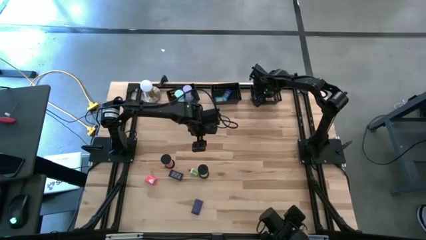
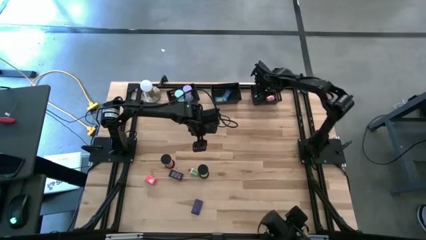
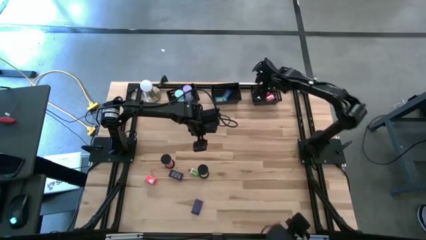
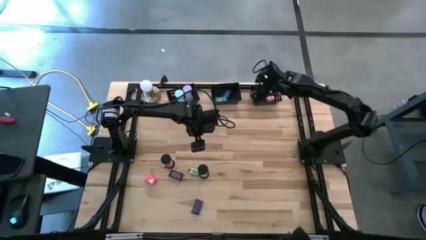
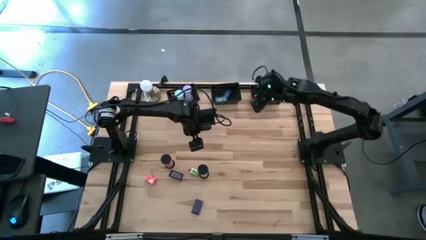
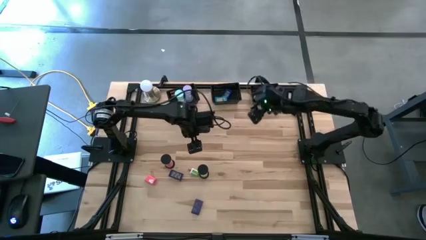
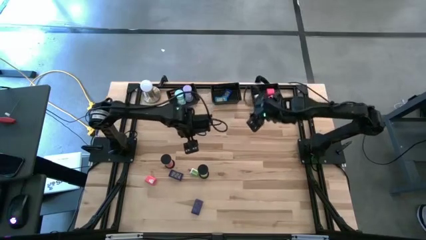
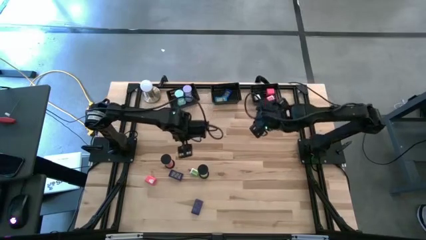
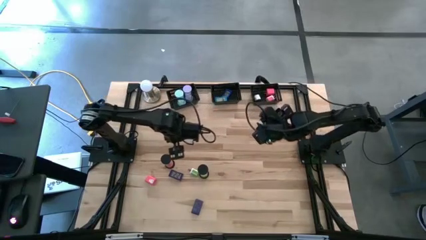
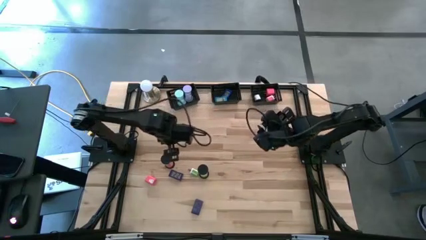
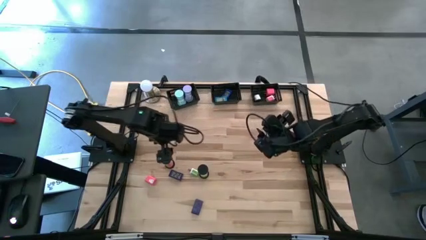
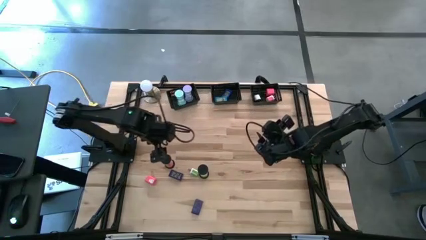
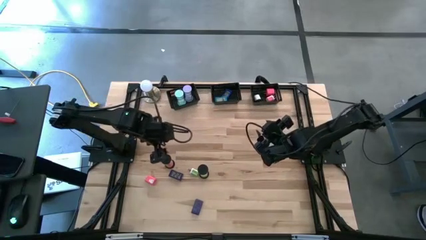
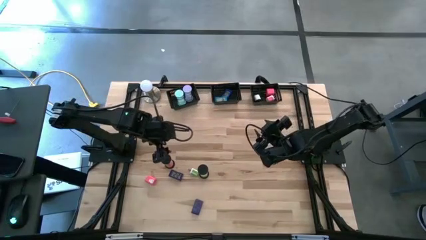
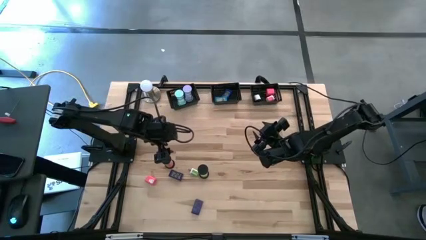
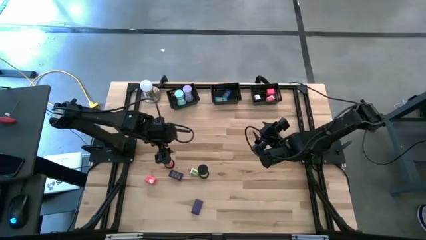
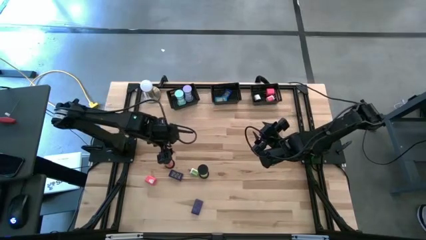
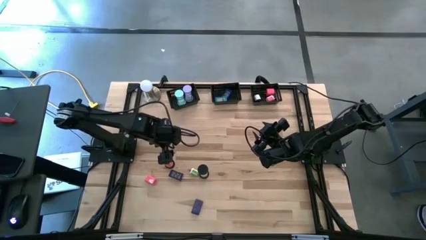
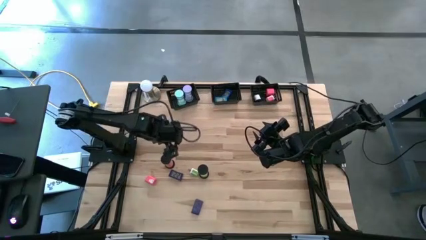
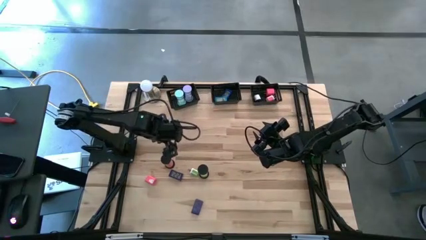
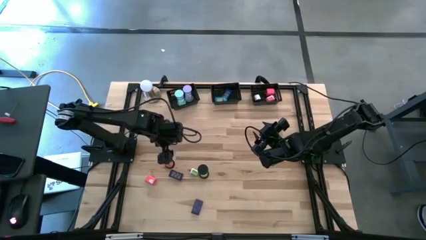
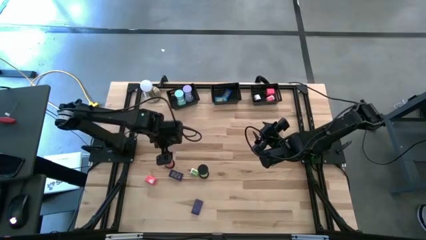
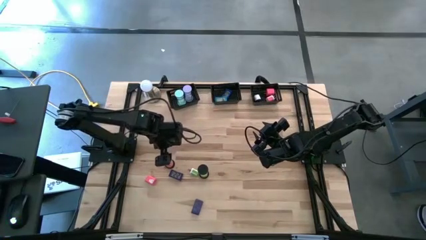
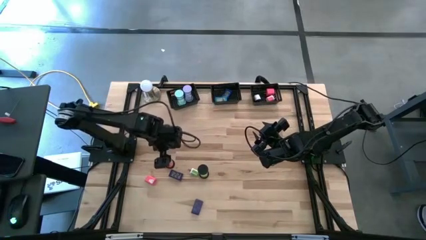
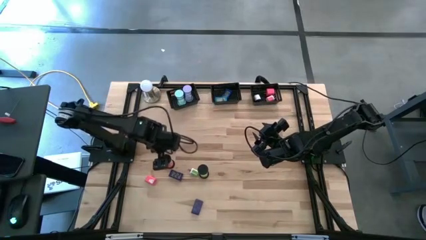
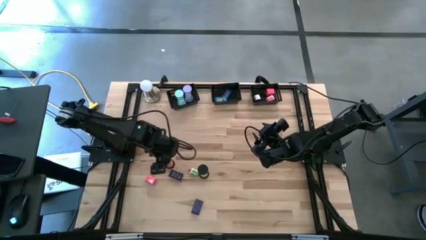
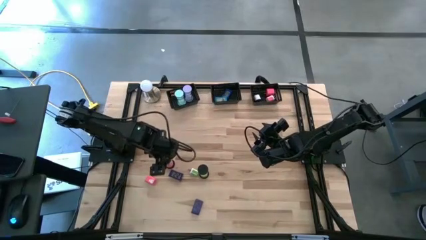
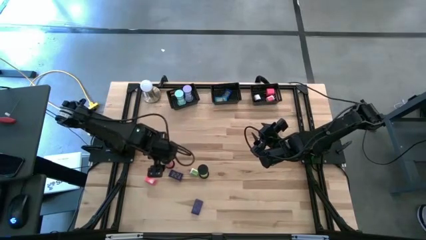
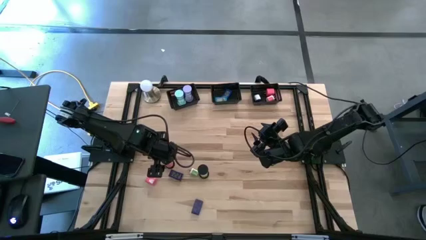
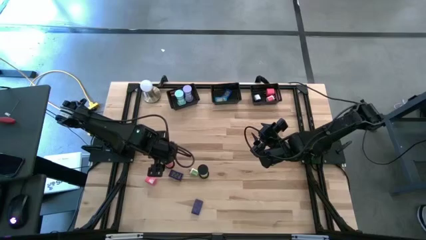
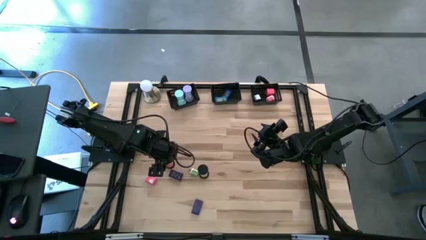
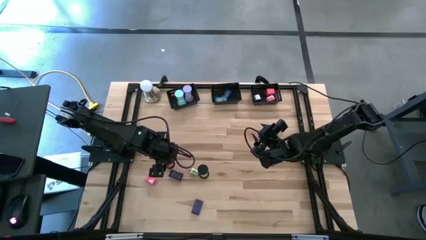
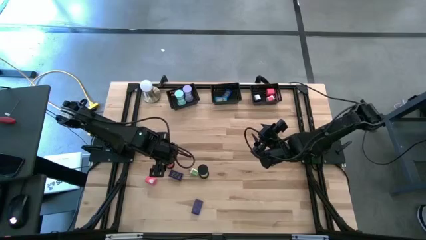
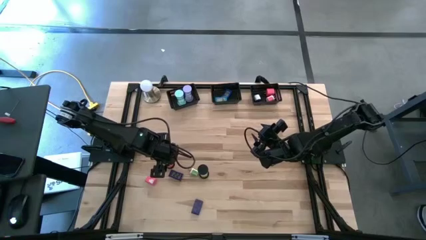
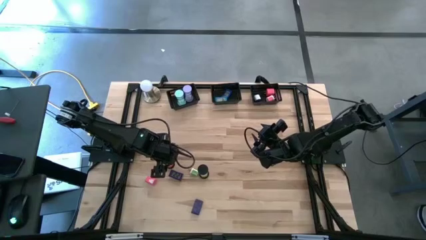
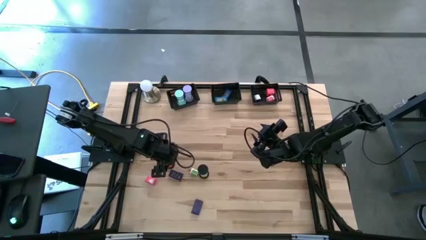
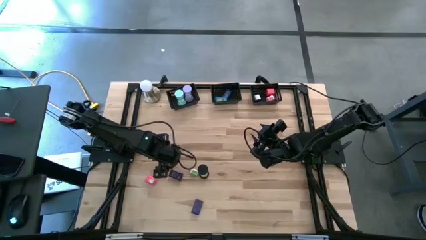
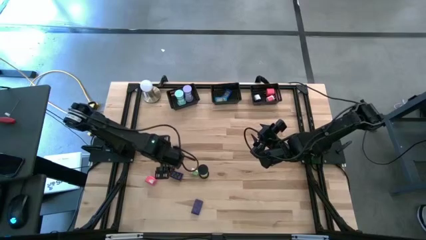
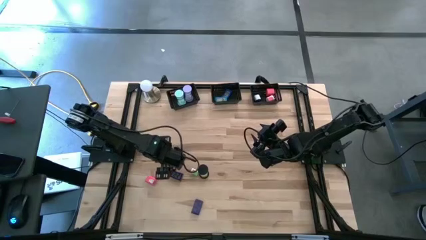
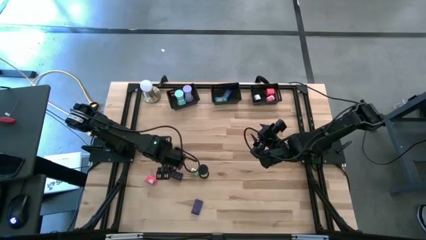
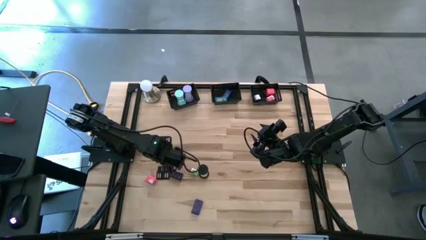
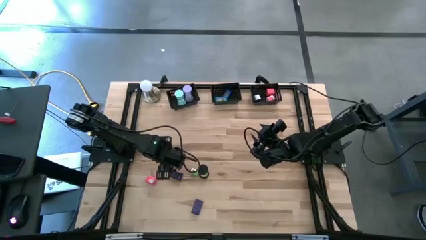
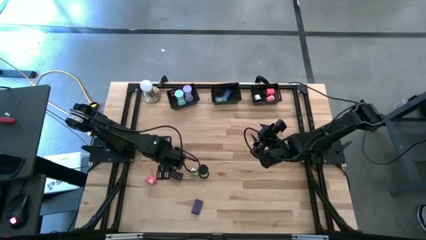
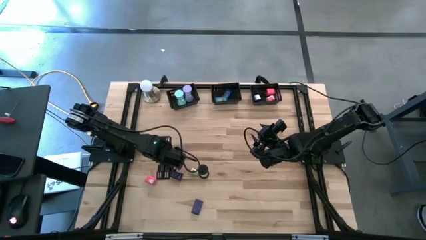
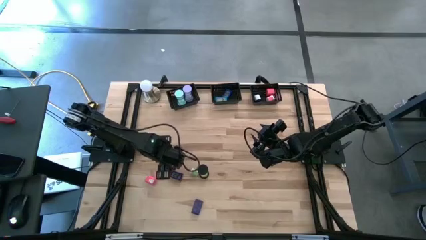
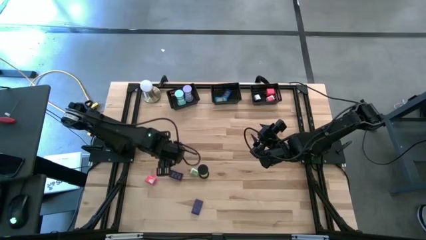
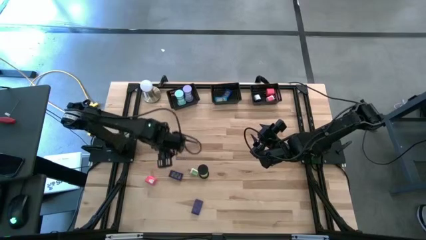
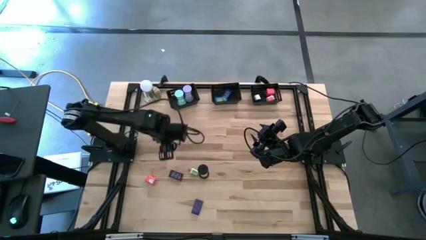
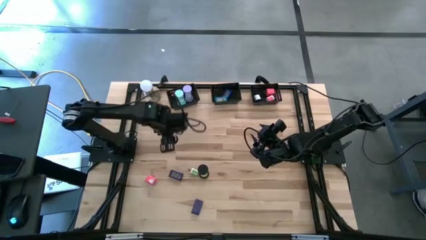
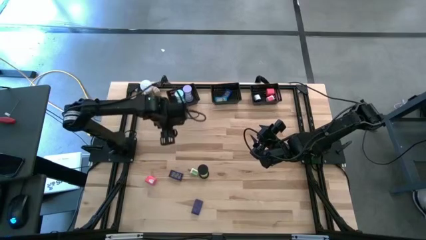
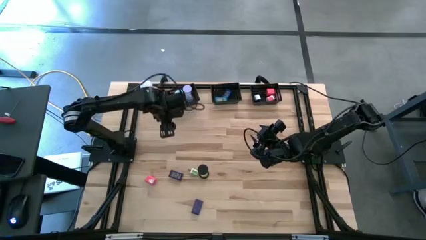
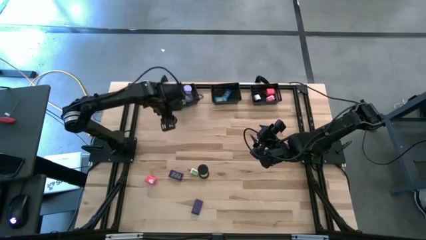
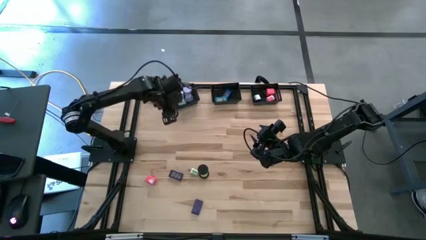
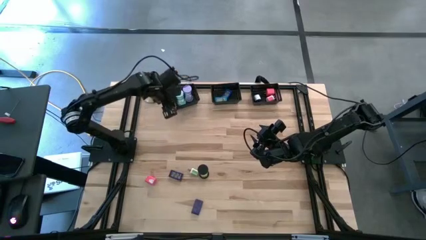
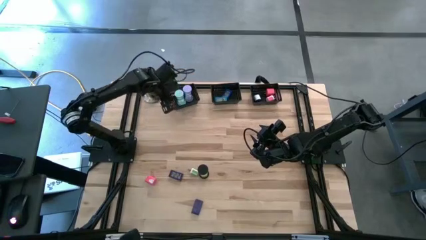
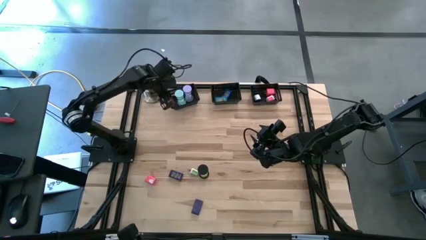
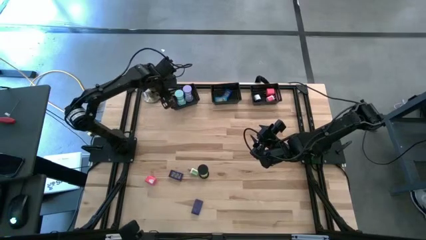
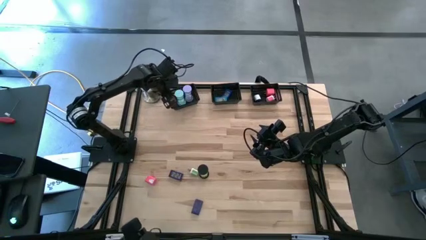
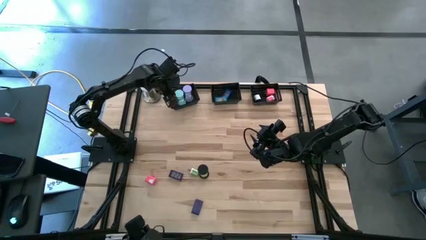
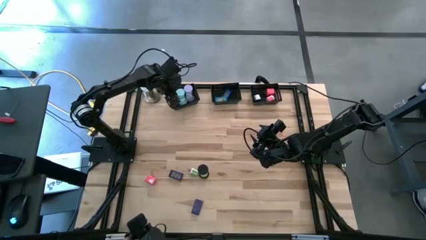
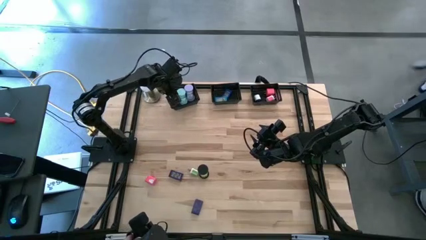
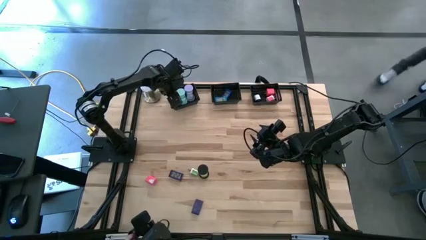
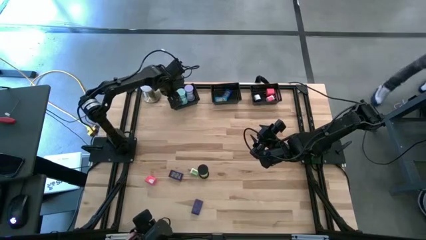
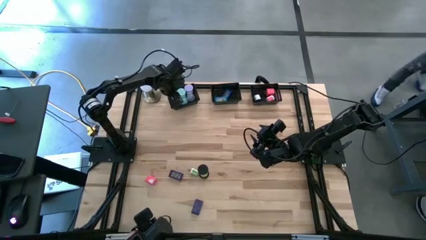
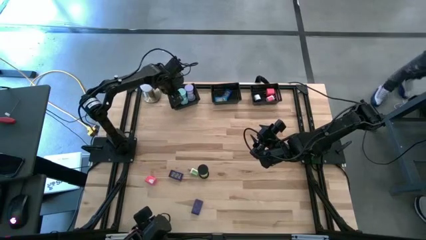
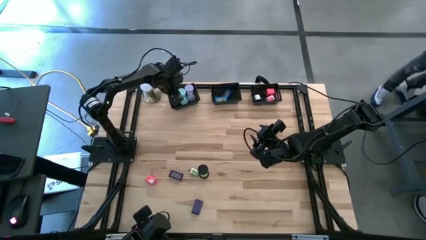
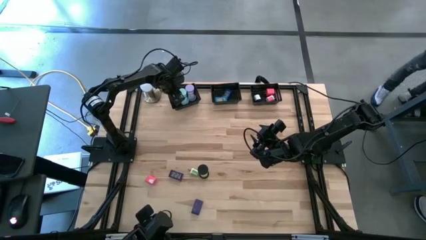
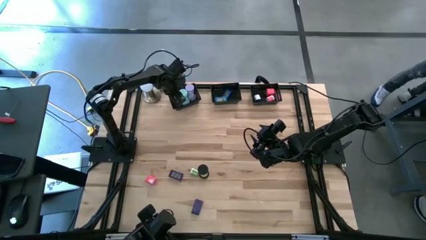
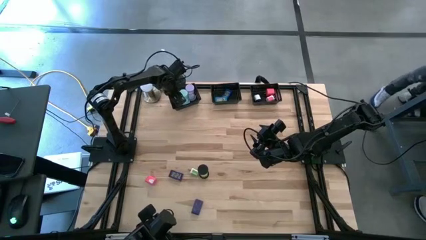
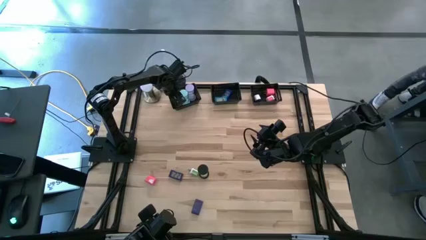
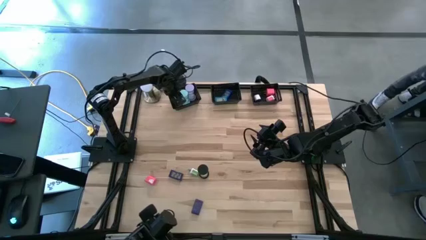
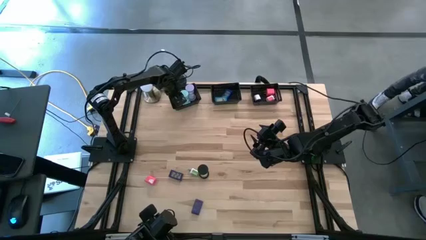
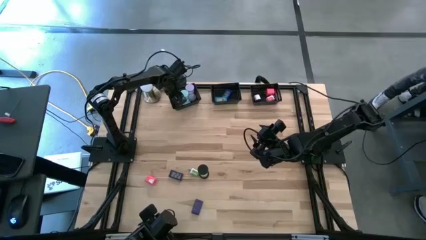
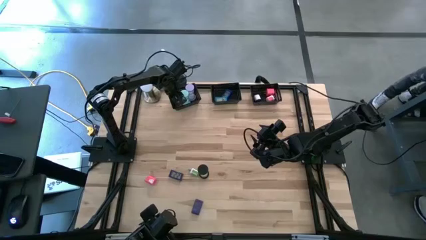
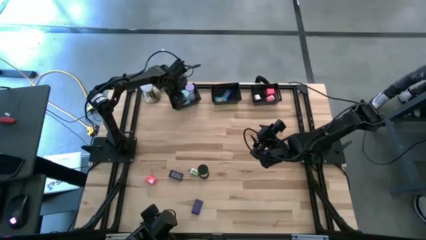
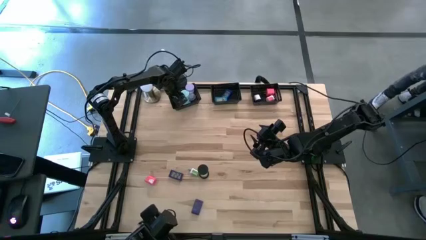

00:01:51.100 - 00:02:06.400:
Task: Pick & Place Office items
Put the pink hourglass into the left black bin
